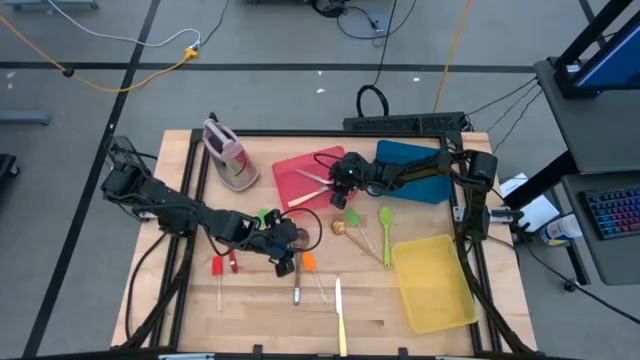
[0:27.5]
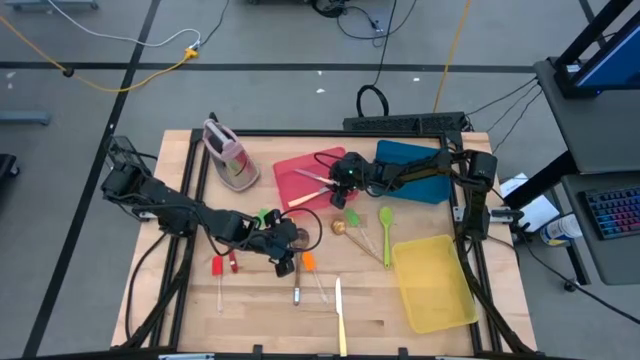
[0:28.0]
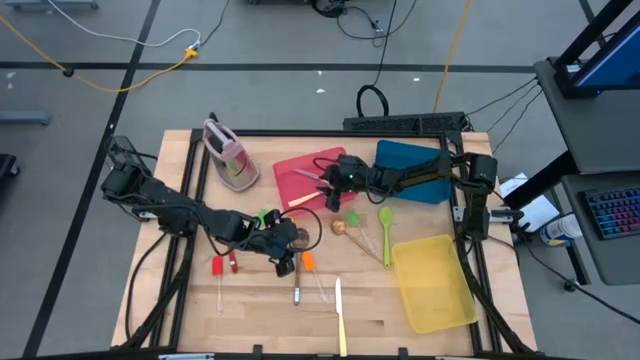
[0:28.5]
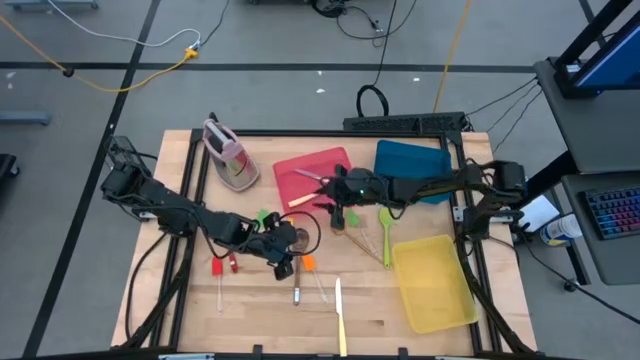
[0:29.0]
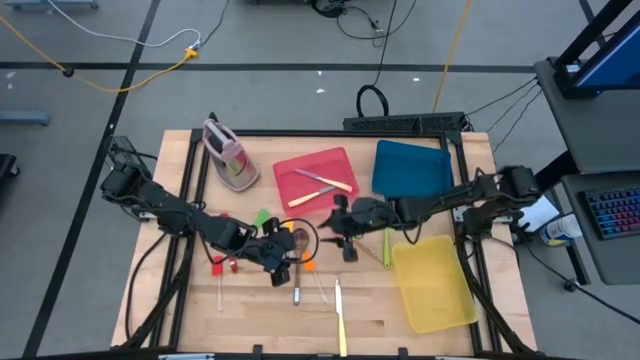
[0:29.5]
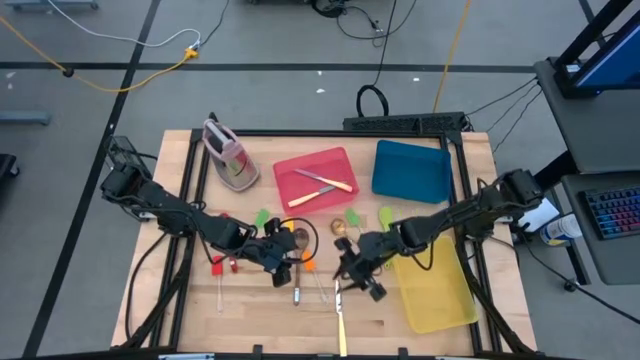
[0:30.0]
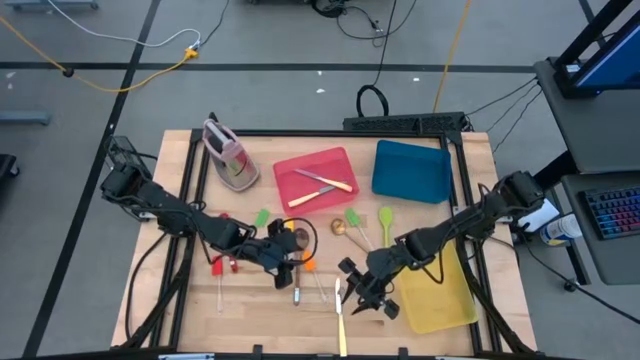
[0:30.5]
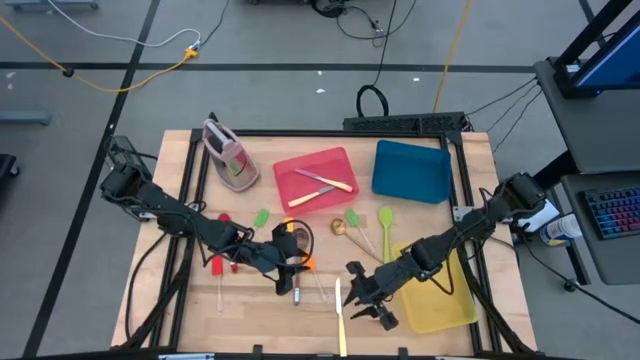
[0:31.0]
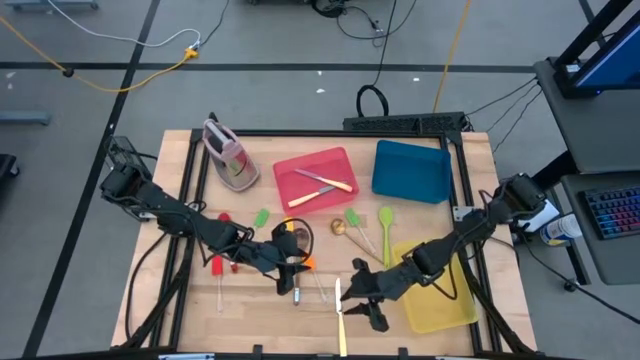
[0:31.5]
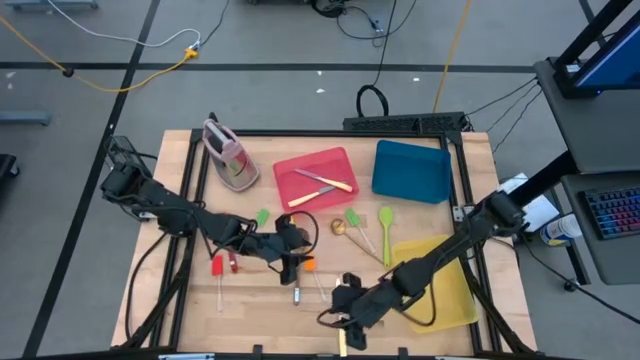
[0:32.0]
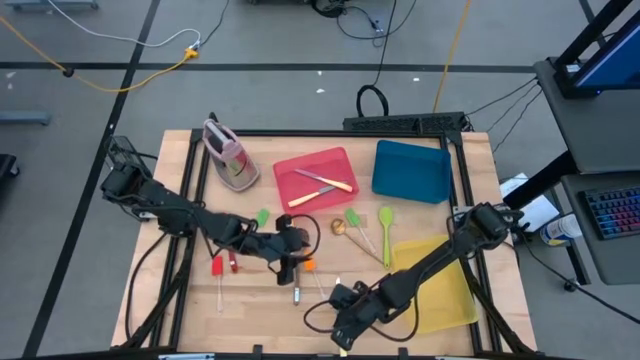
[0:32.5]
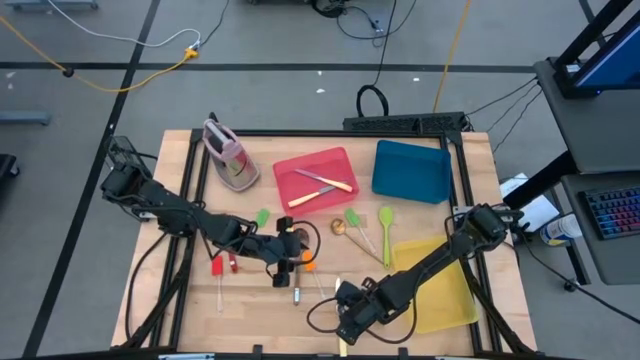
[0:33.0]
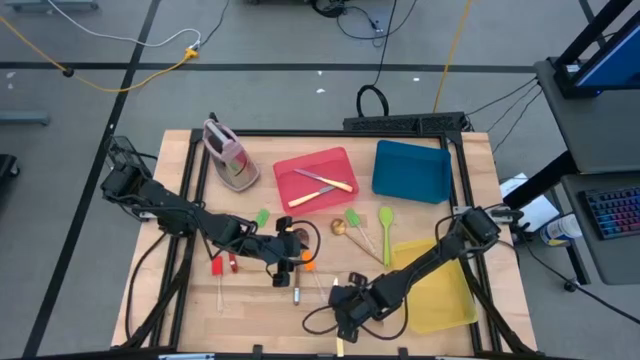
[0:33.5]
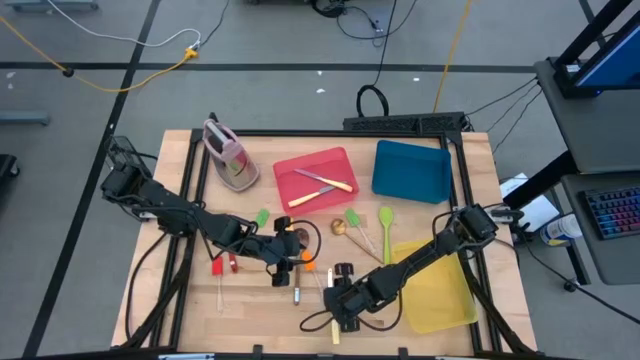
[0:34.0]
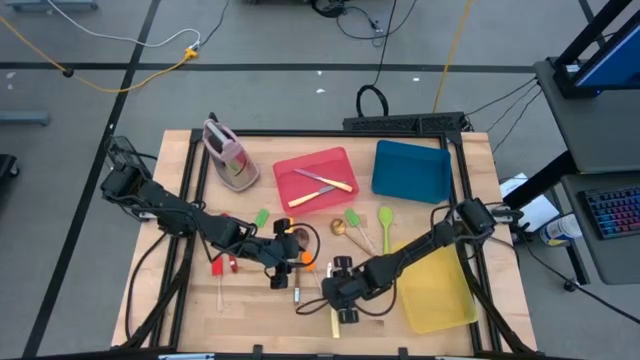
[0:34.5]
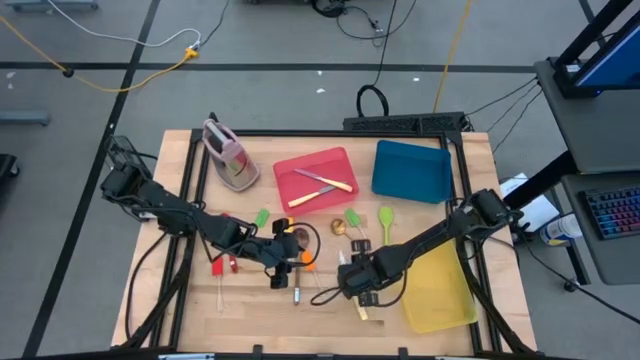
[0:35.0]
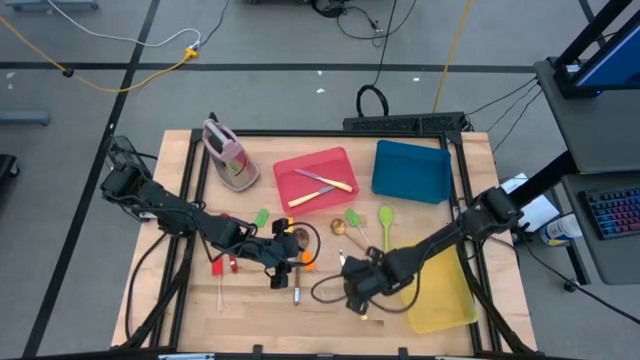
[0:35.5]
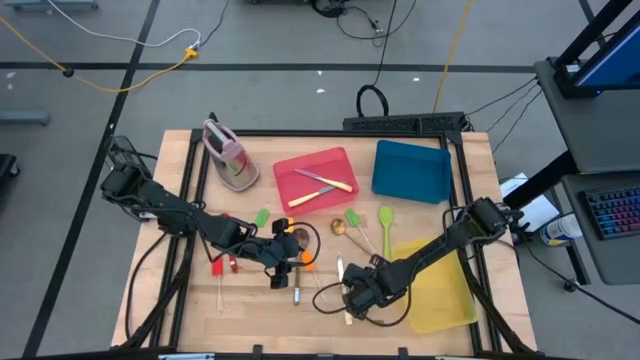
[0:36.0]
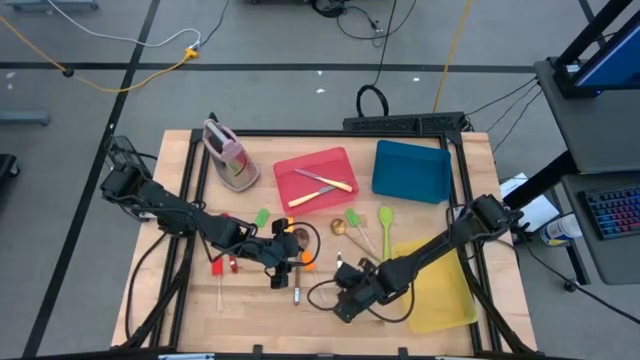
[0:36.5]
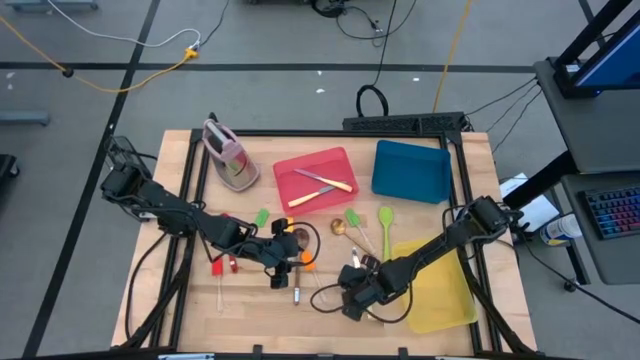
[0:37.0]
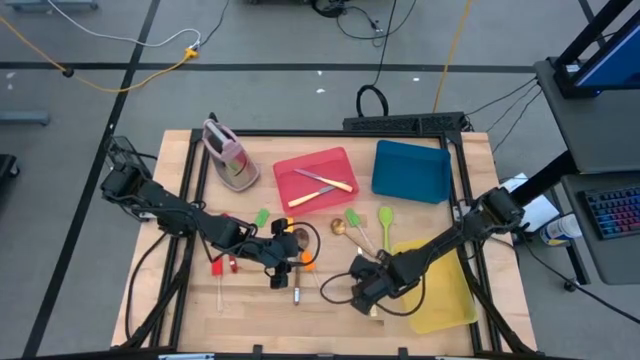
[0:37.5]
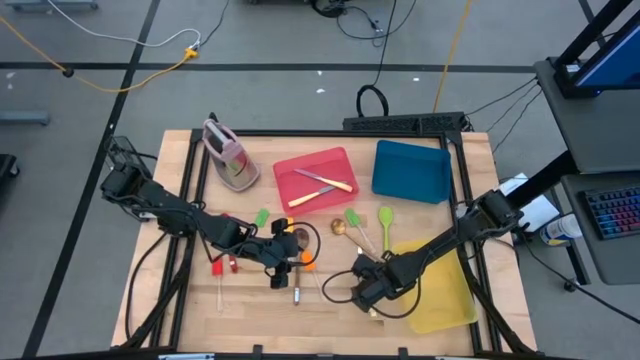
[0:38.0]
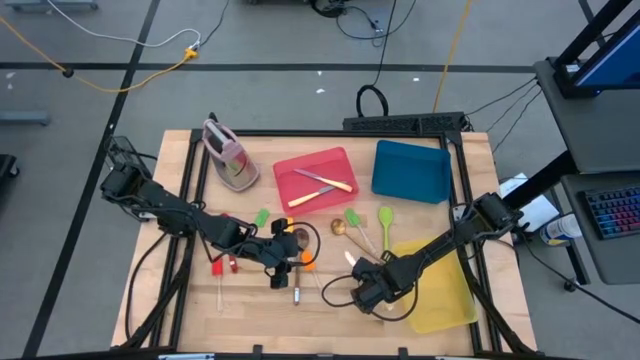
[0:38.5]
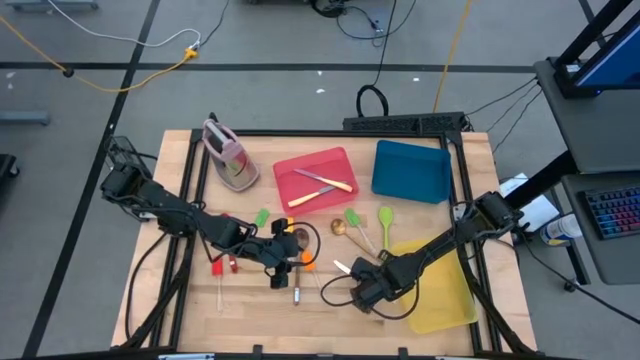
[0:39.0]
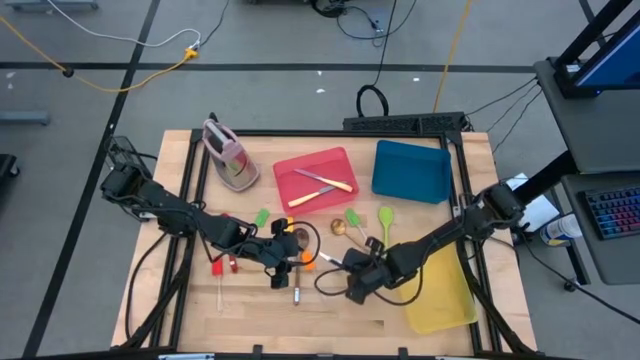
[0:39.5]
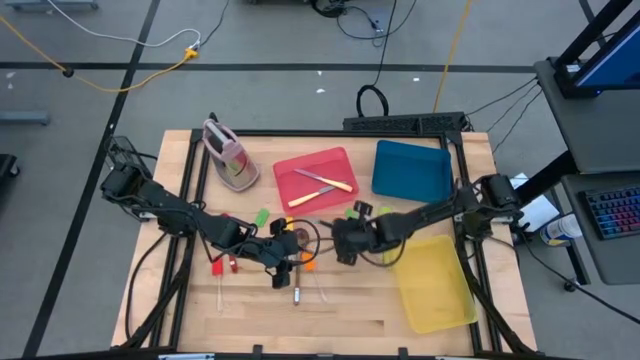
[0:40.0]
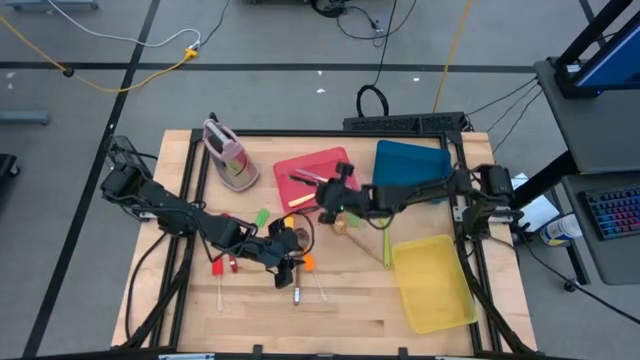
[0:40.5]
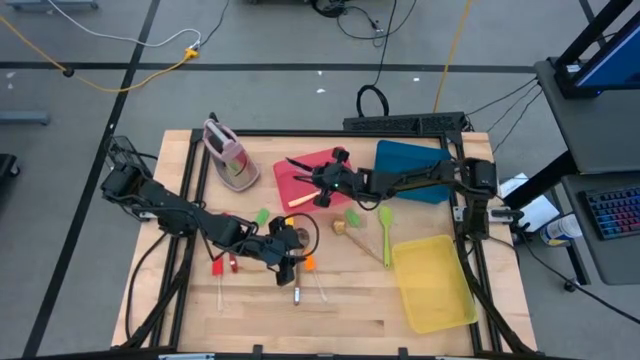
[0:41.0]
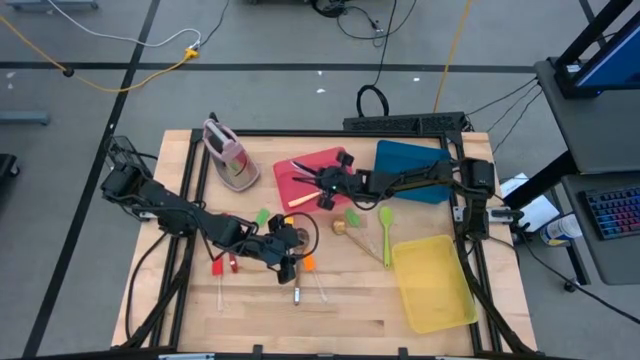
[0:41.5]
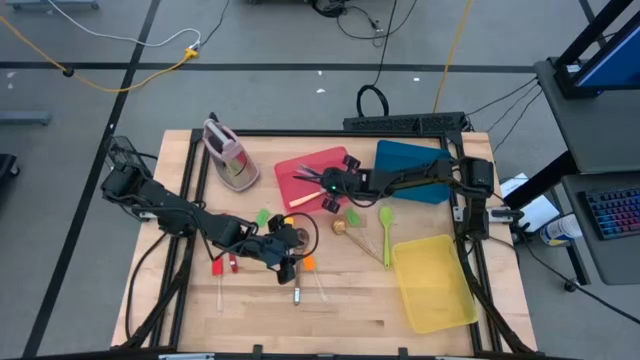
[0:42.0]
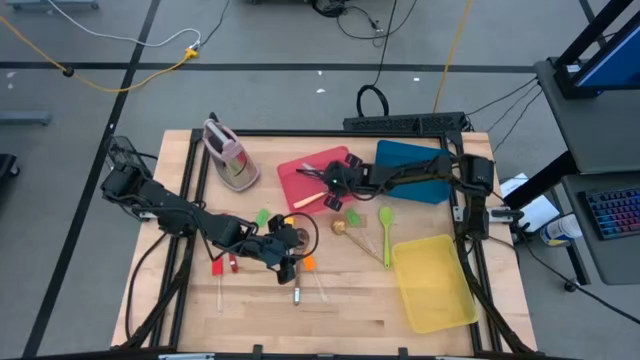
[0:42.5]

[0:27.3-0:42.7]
Task: Pick & Place Kitchen Items
Put the yellow knife into the pink bin
